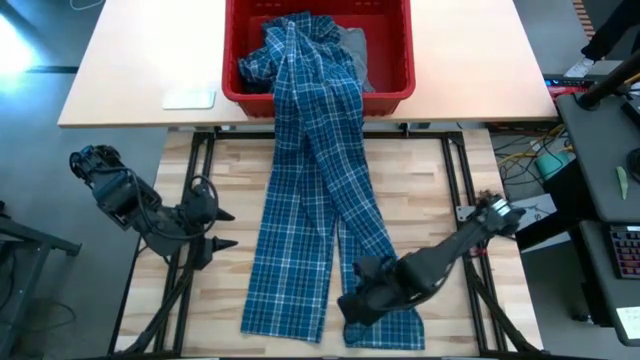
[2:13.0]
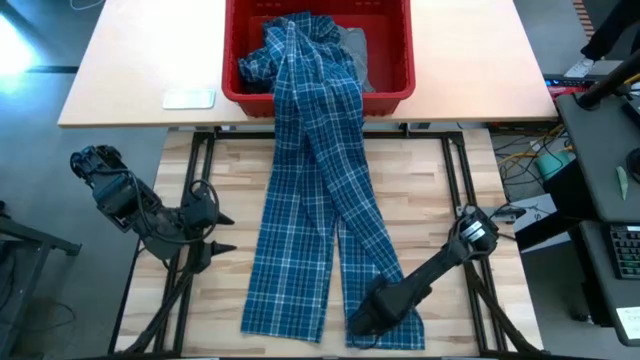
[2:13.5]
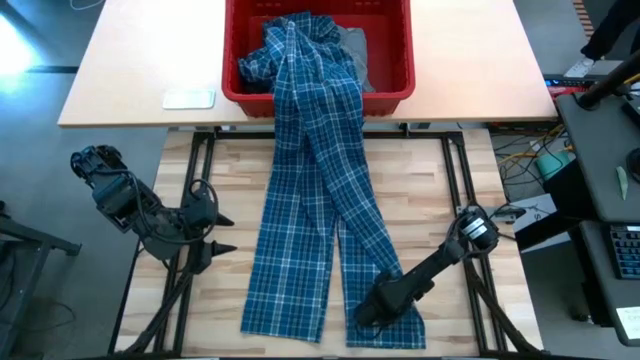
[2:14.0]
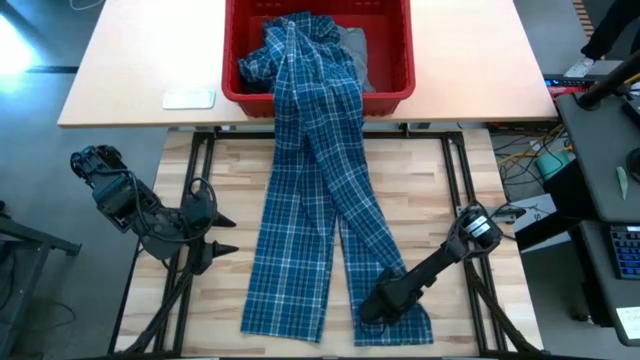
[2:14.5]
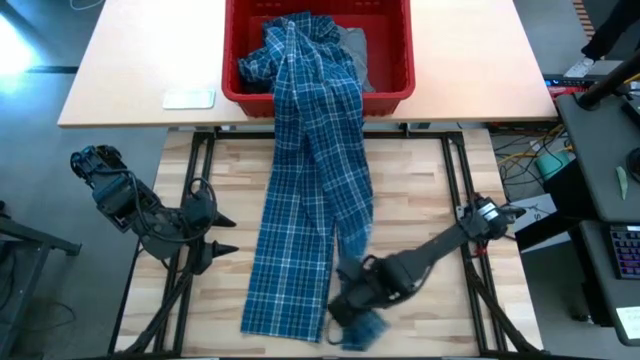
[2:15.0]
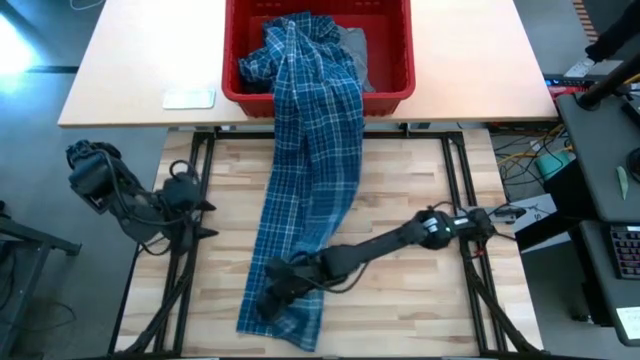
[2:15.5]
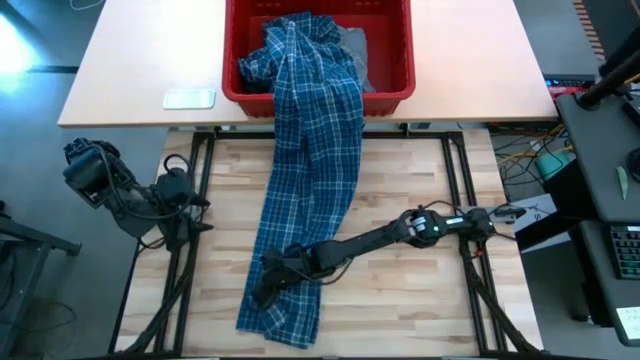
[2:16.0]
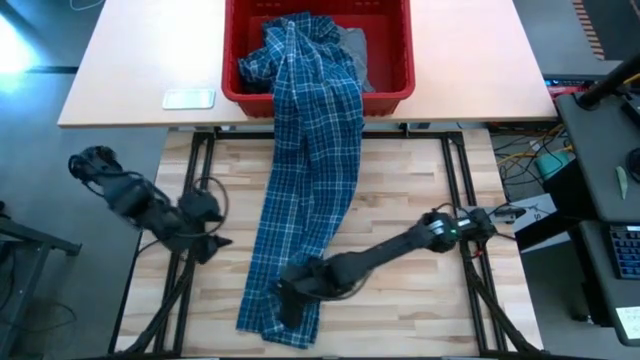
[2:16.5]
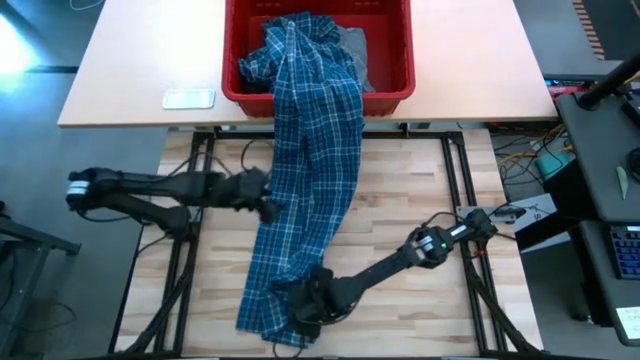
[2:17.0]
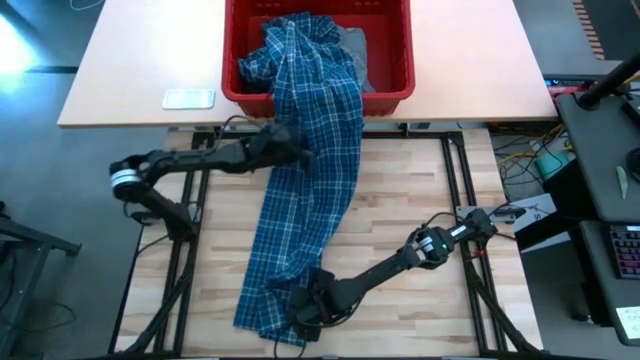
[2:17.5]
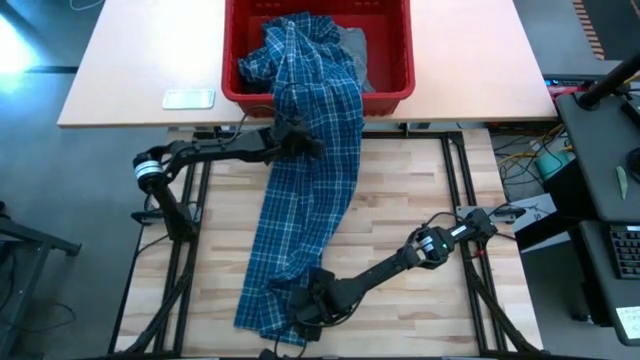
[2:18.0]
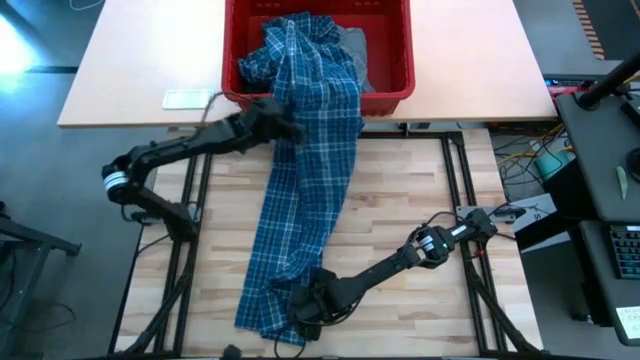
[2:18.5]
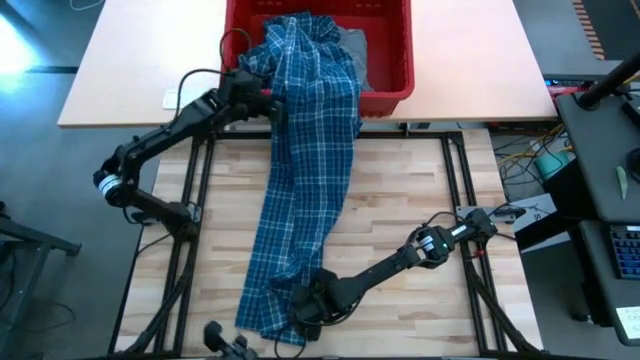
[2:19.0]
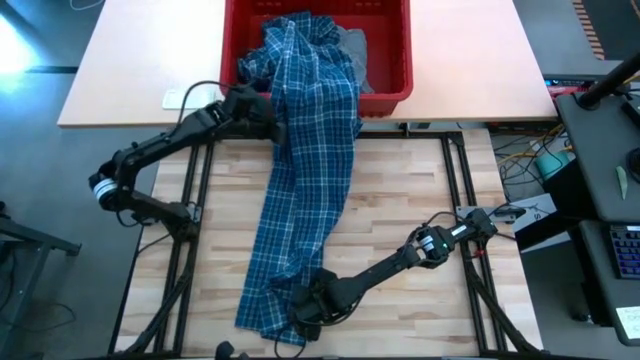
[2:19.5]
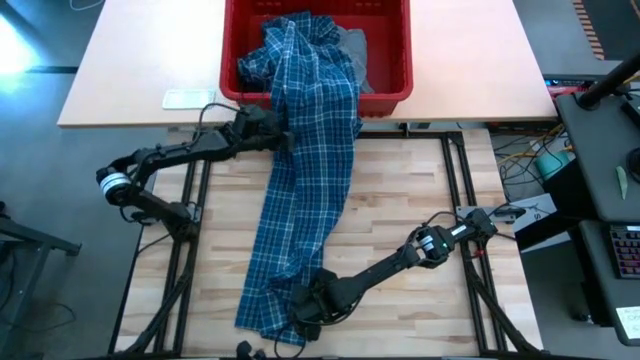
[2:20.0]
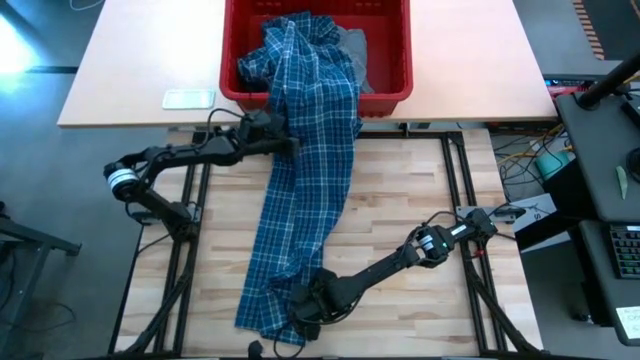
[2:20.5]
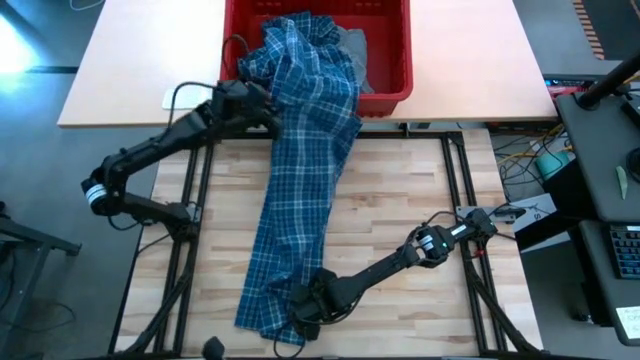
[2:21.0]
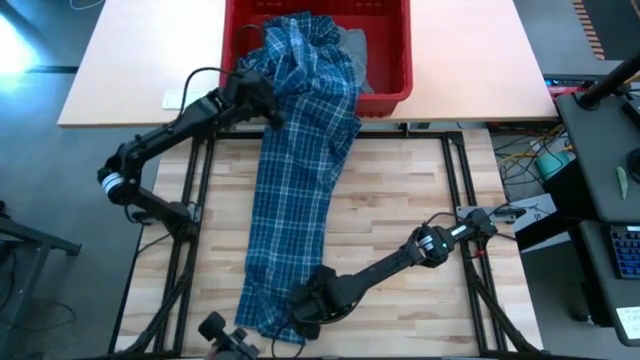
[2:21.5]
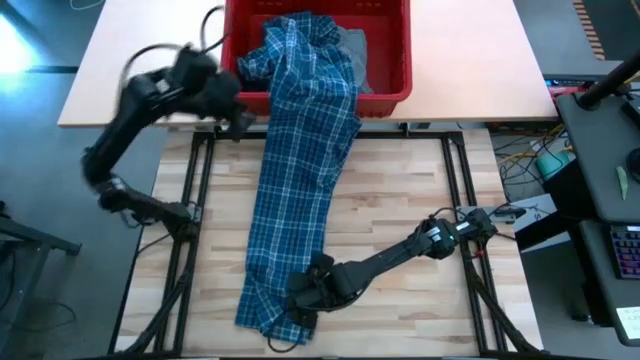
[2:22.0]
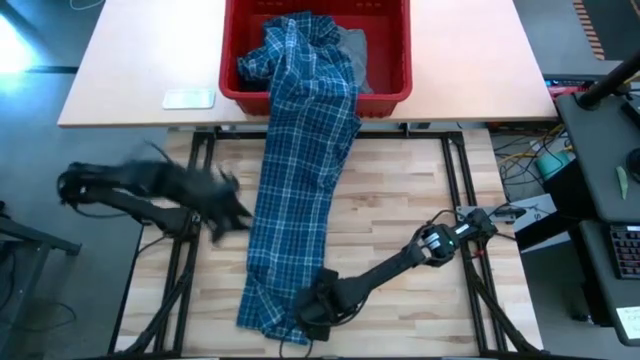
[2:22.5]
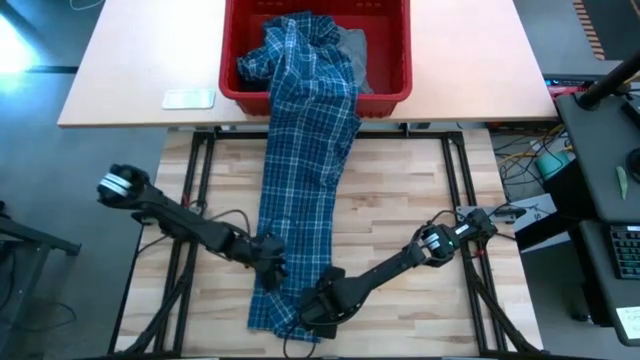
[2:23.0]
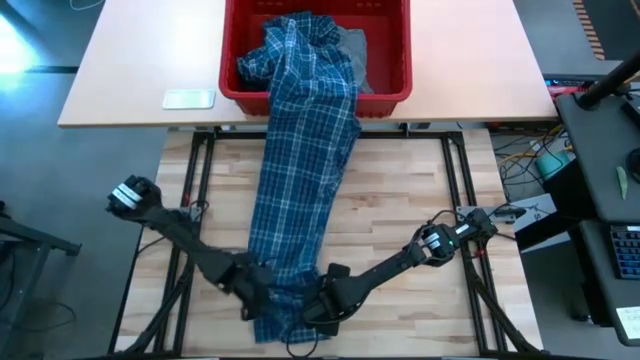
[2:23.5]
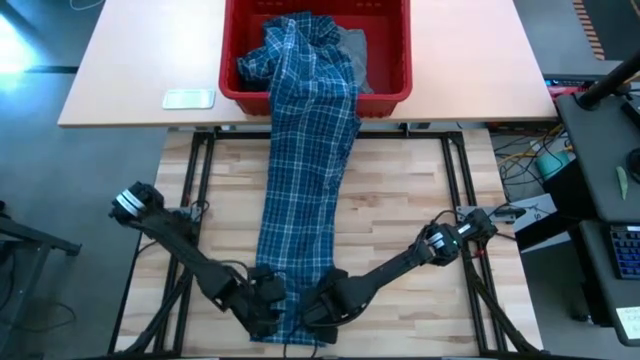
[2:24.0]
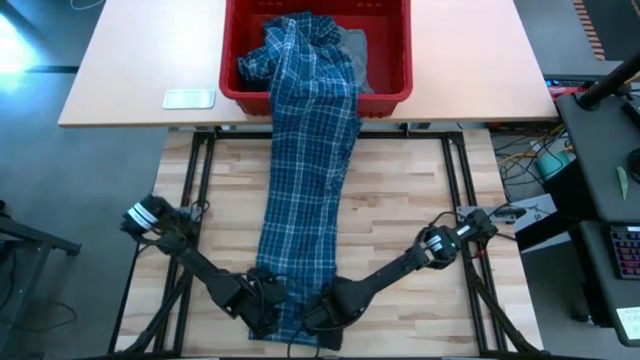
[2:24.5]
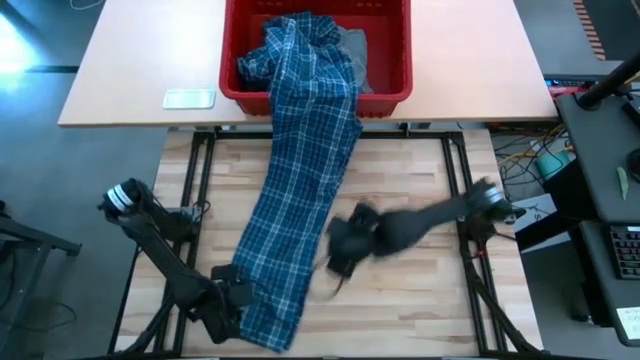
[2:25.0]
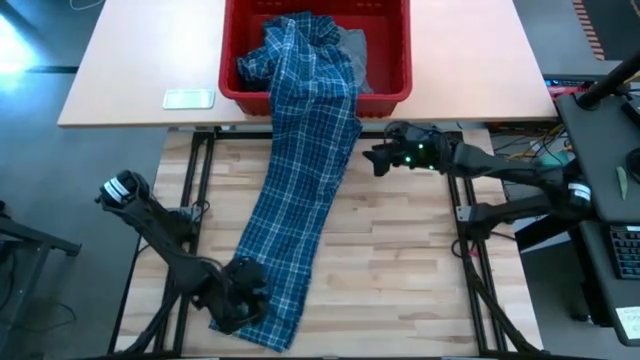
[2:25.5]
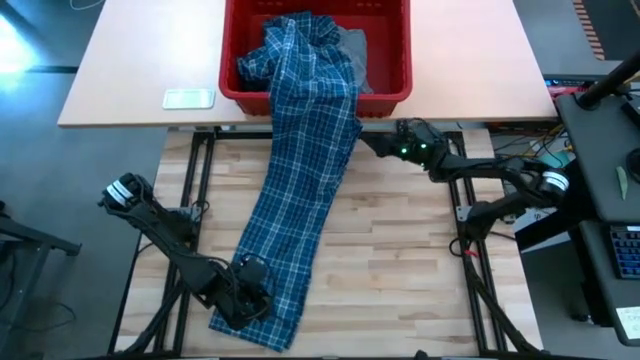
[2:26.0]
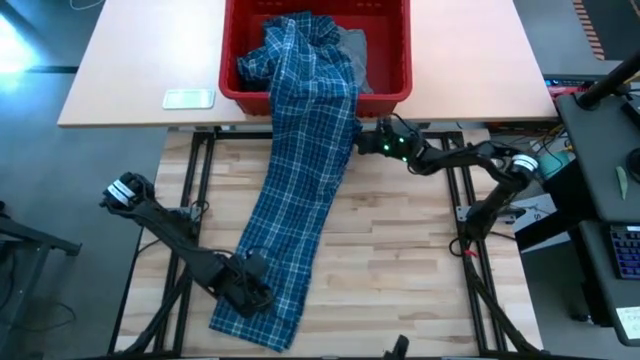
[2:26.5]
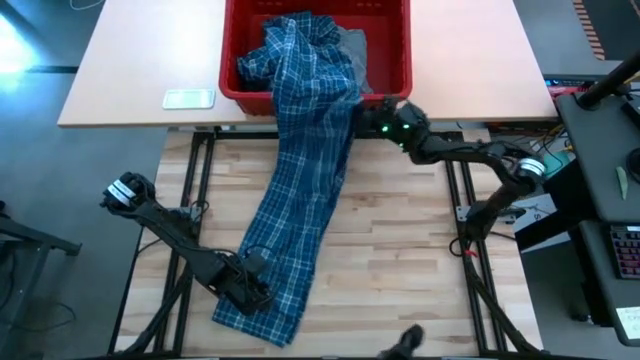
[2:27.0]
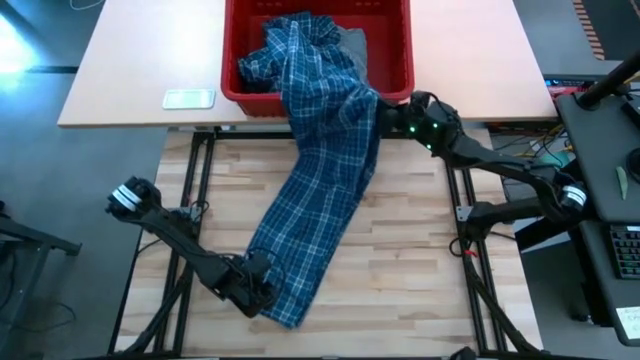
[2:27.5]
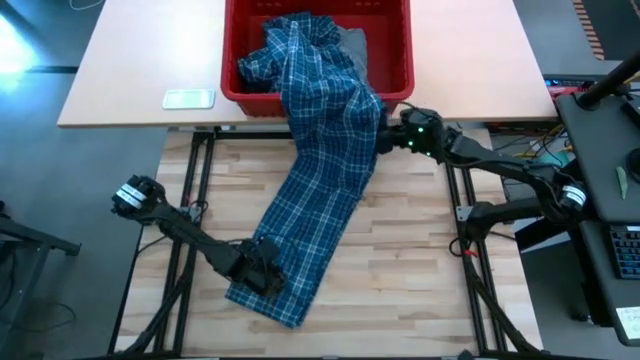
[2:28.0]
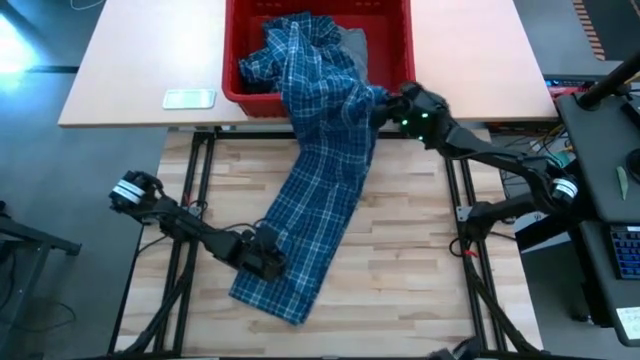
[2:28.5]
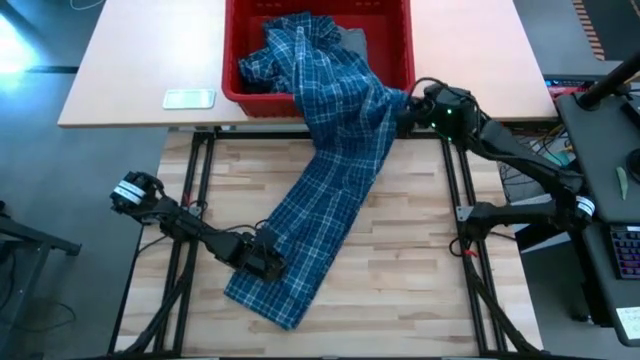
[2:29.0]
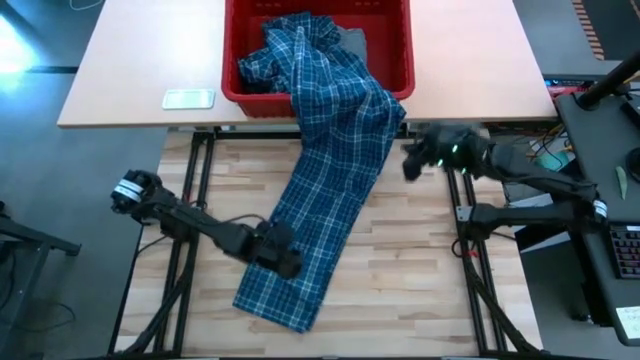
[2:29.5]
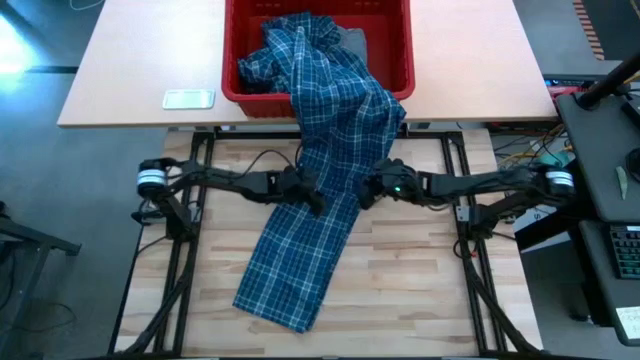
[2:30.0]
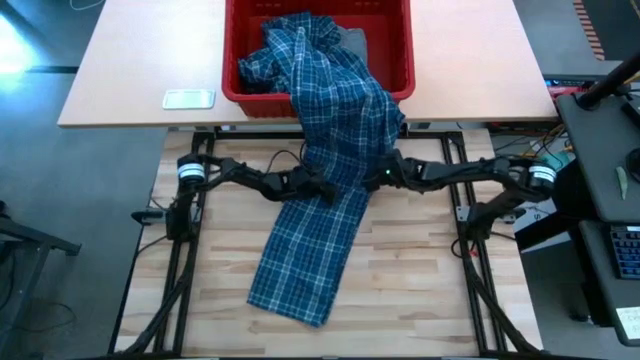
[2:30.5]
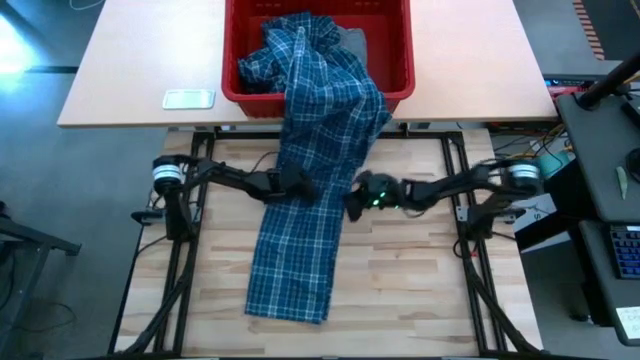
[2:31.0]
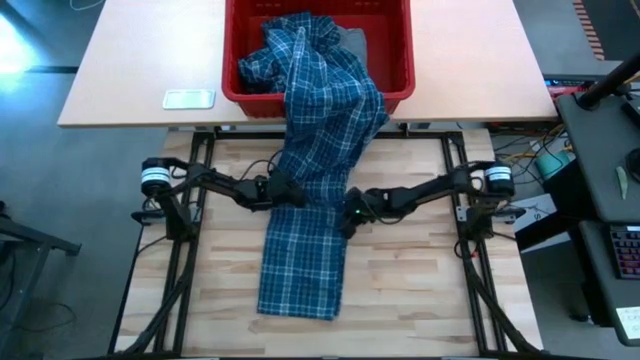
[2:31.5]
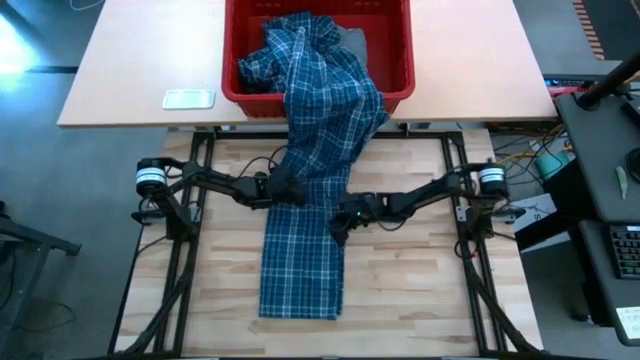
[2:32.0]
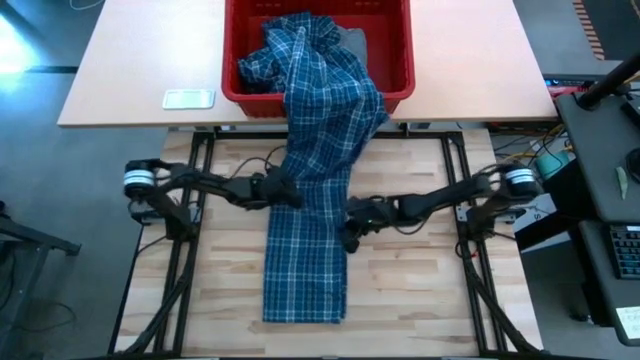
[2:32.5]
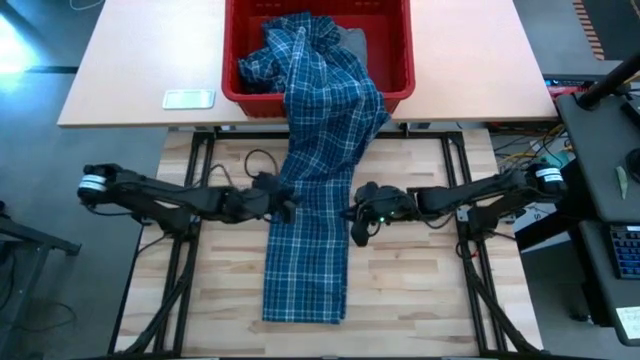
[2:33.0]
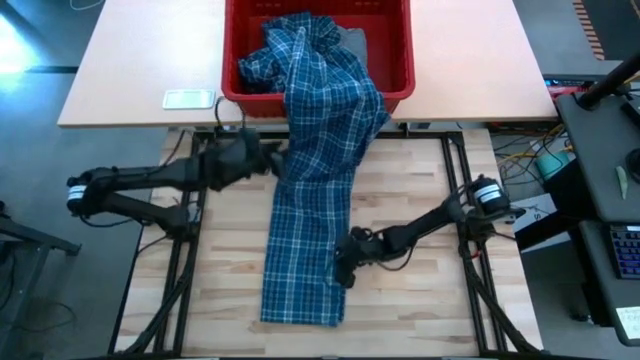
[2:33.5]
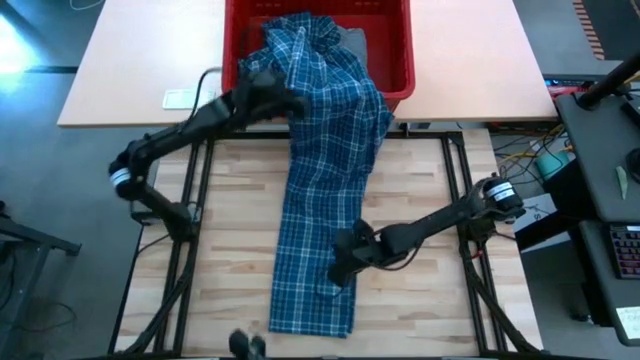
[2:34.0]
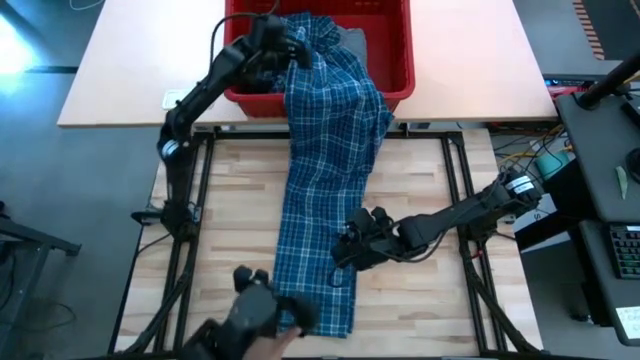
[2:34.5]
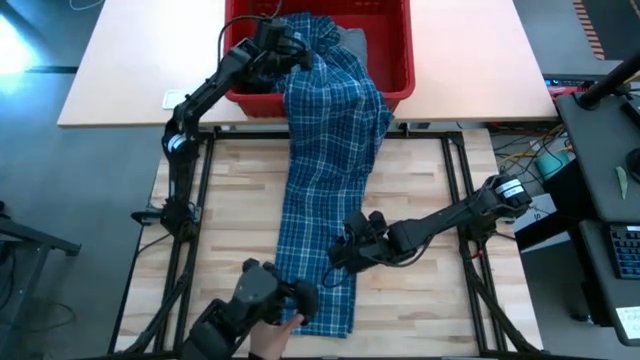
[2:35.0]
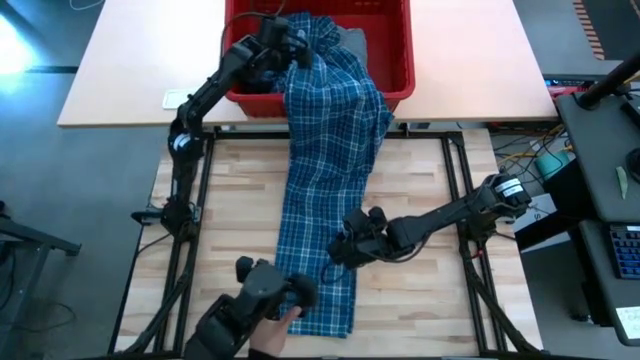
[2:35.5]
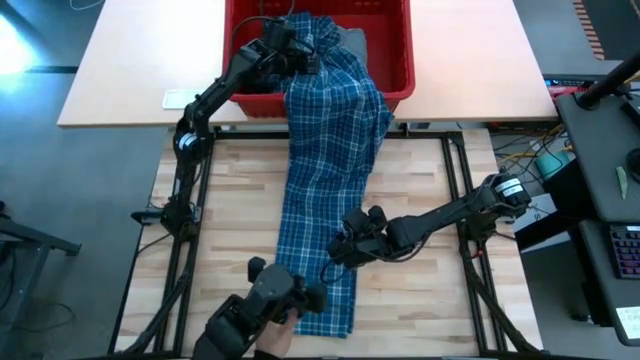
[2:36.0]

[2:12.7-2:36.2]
Task: Fold Laundry from Bin
Fold the blue patterned pants
